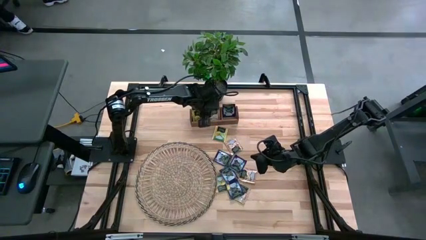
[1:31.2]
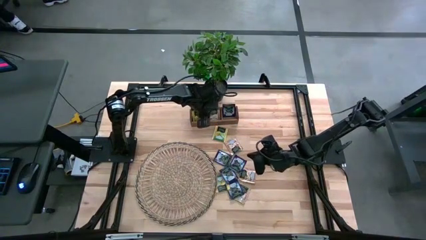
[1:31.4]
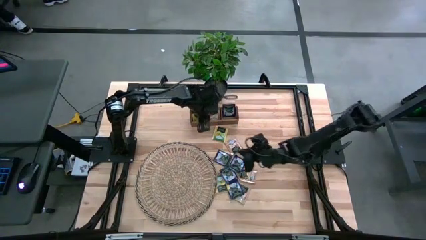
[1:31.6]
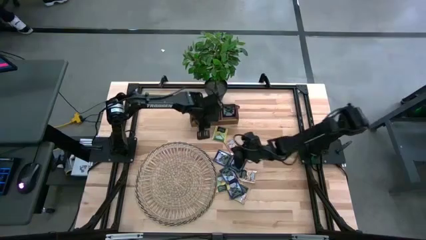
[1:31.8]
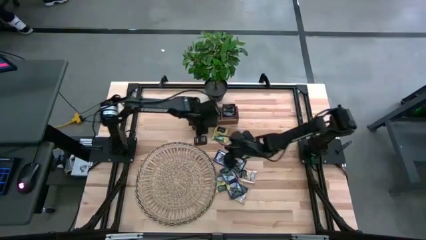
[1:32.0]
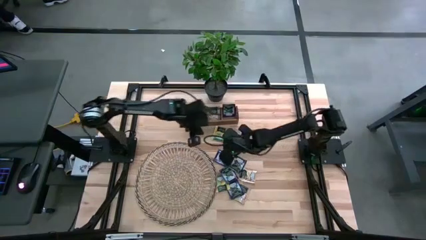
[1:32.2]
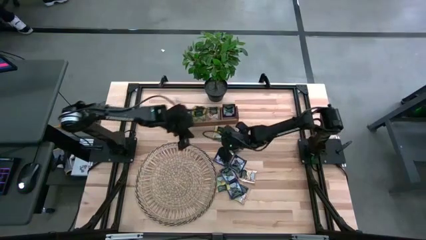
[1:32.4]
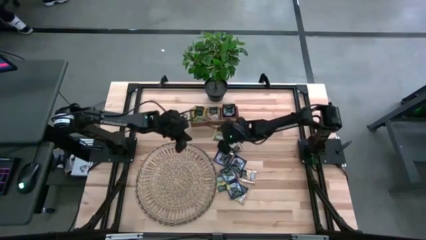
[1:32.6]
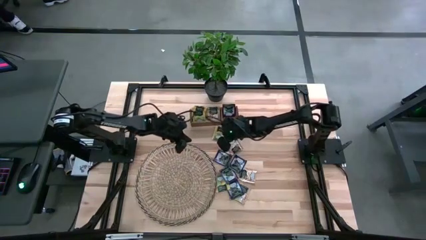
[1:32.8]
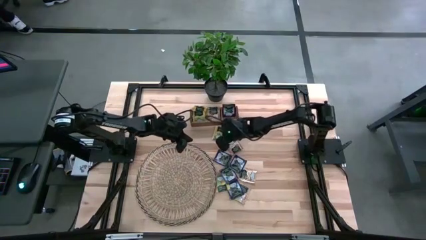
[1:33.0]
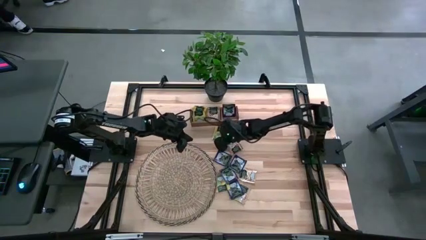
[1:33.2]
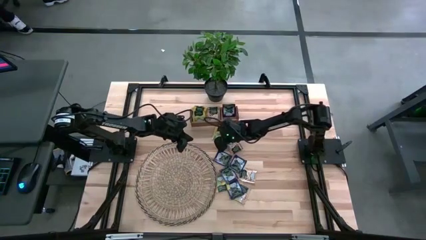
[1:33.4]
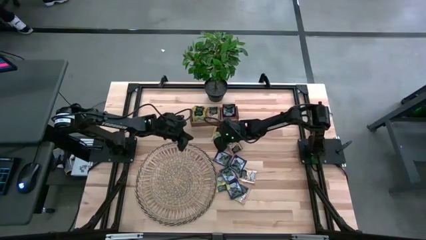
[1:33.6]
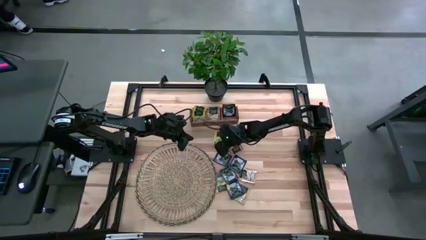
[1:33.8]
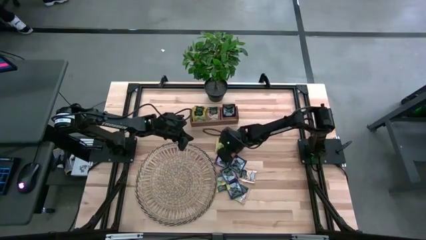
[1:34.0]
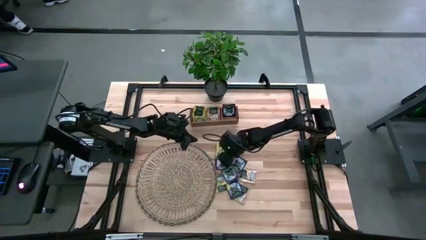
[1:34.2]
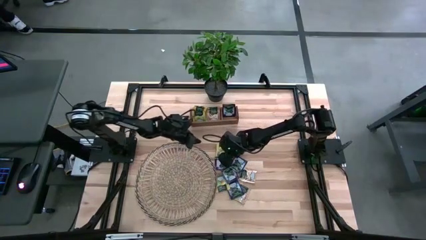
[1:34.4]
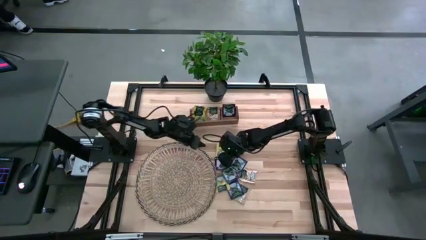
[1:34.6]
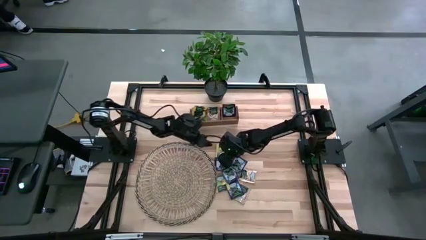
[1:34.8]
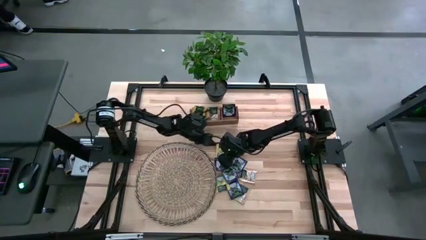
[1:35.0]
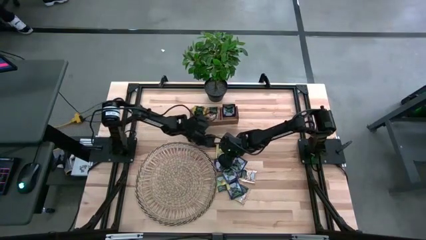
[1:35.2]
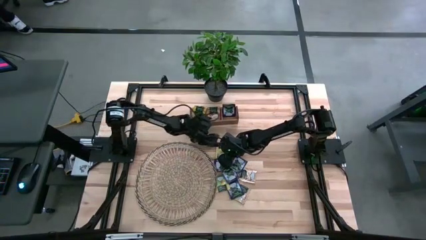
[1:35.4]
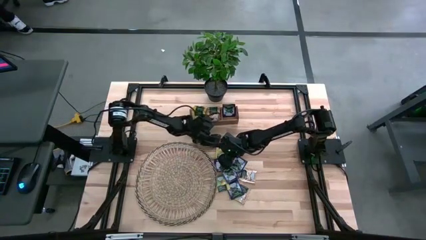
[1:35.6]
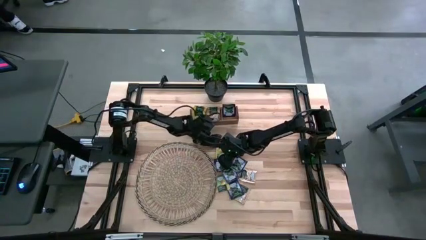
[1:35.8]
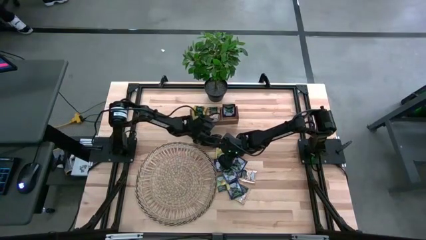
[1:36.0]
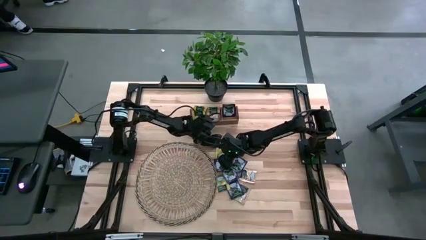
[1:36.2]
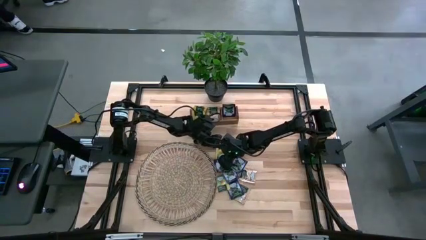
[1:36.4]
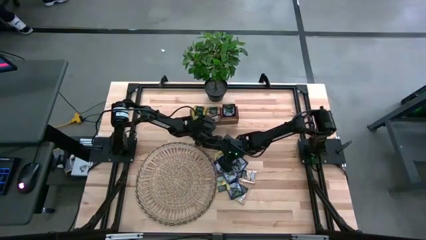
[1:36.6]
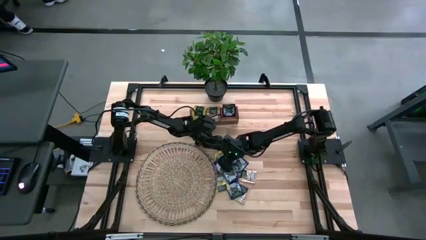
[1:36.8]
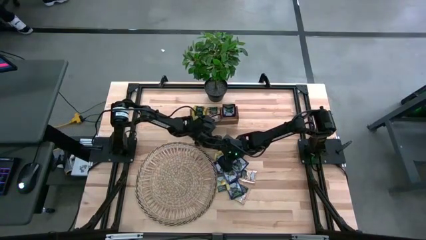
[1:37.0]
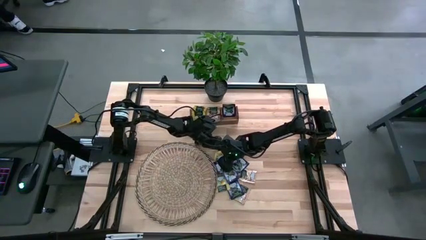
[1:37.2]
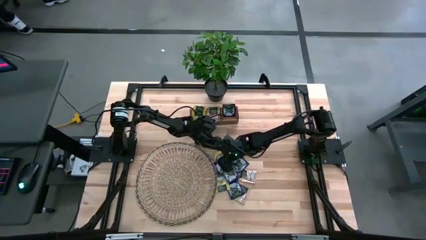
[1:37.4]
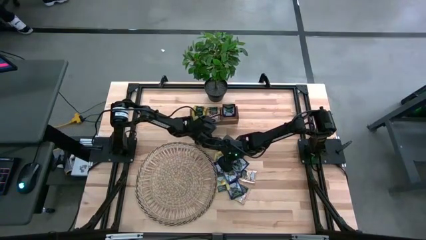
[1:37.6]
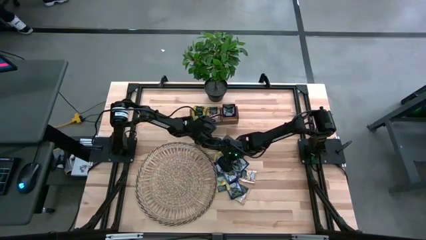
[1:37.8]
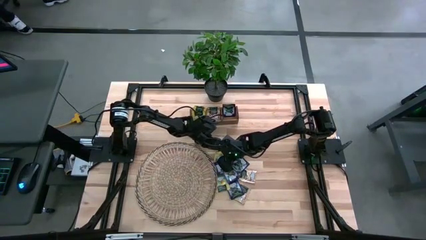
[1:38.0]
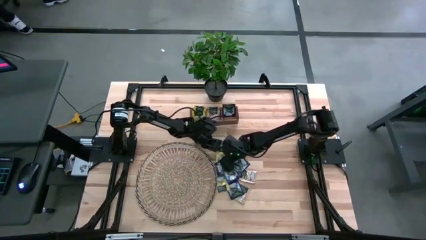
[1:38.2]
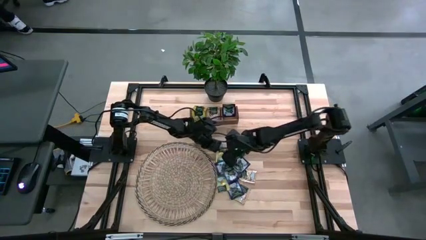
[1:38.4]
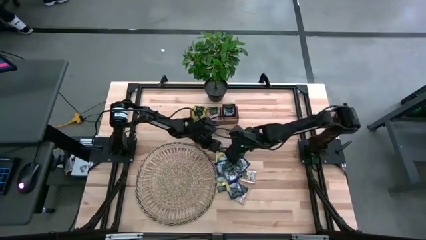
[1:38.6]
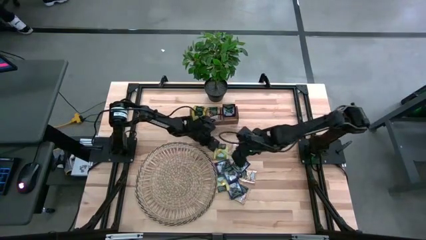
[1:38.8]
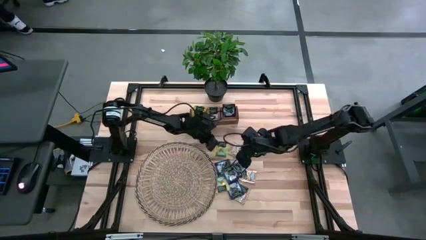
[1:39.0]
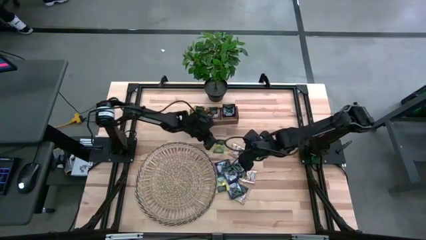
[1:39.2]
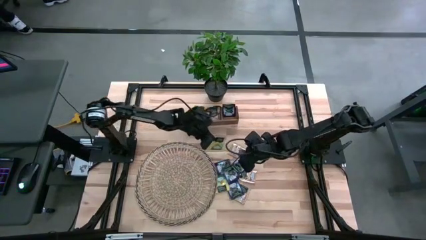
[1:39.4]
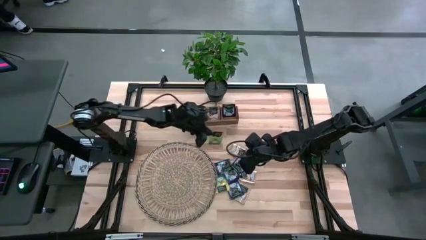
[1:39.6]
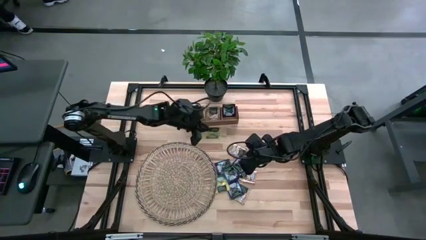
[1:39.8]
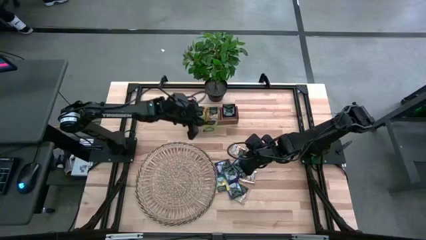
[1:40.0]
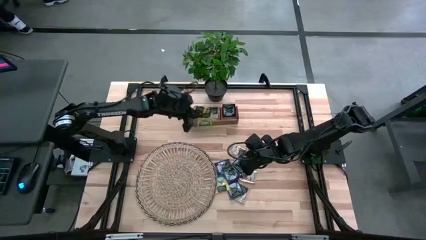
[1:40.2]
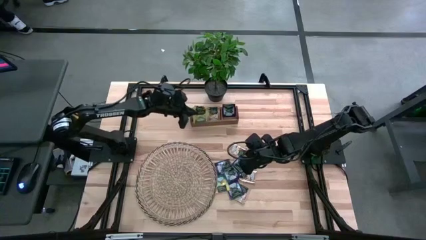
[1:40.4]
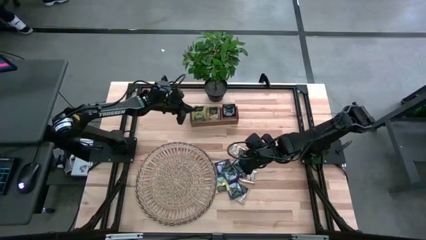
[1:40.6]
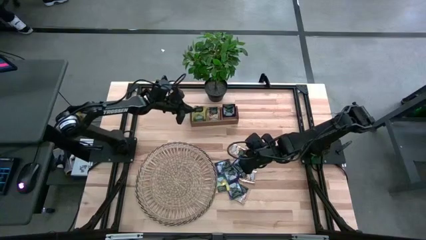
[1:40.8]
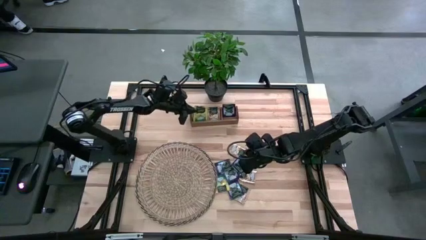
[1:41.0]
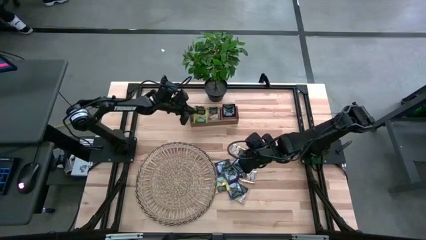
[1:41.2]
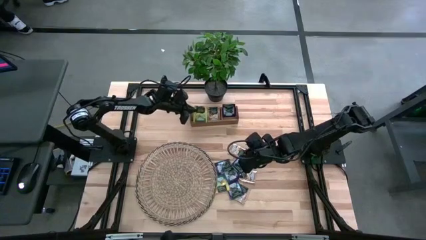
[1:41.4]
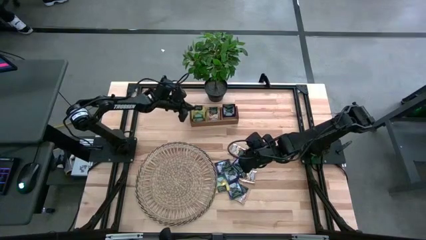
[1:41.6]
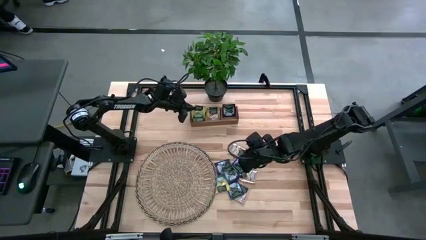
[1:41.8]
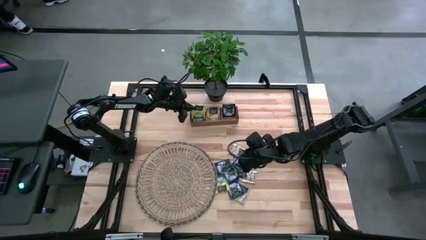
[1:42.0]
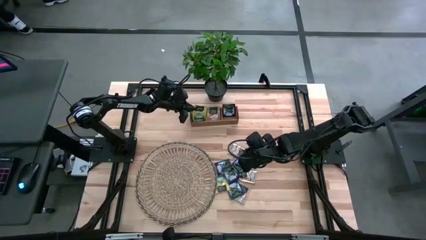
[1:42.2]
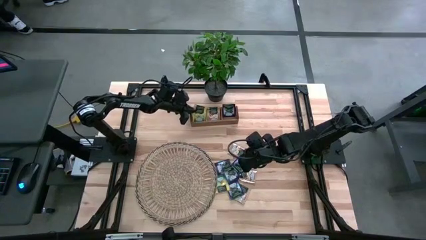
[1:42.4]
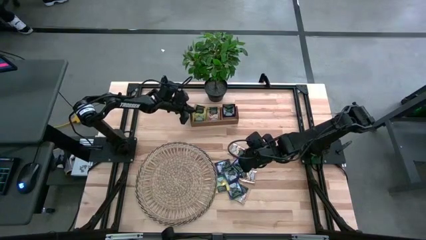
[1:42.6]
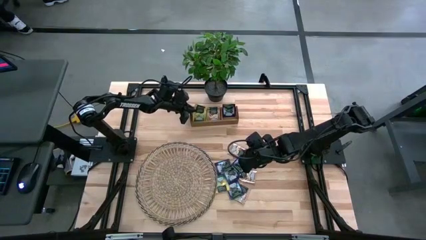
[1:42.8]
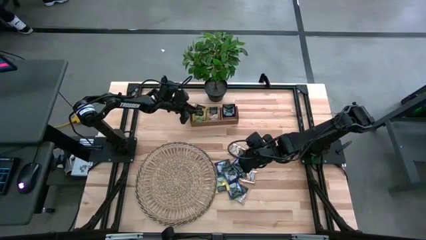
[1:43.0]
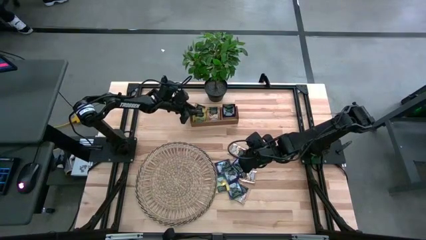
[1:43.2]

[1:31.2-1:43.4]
Task: Pick & Place Tea
Put the yellow tea bag into the left section of the wooden organizer

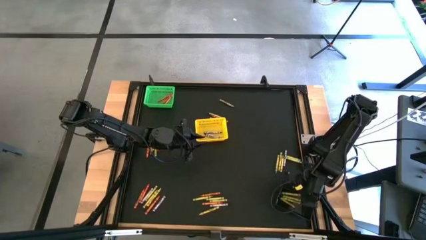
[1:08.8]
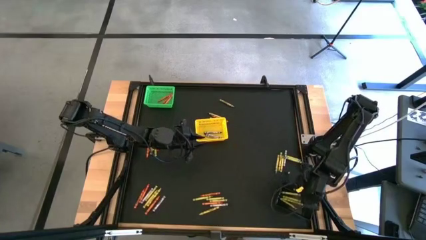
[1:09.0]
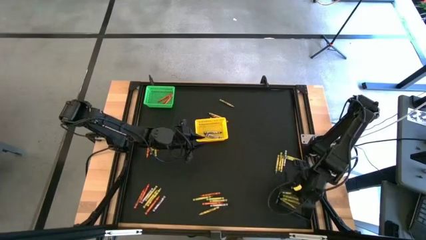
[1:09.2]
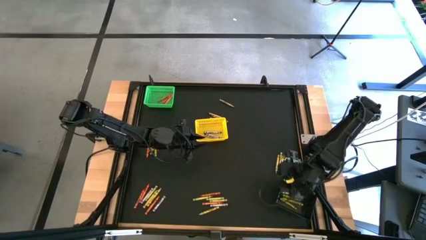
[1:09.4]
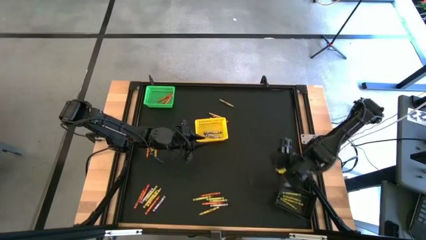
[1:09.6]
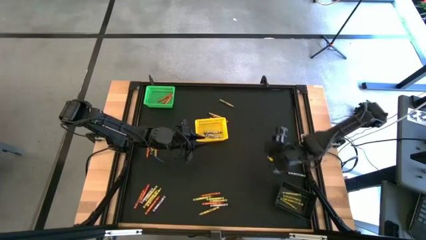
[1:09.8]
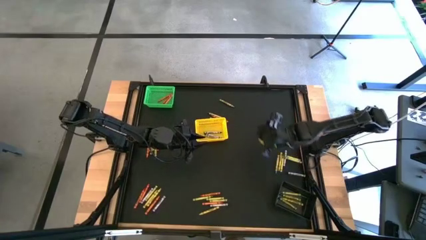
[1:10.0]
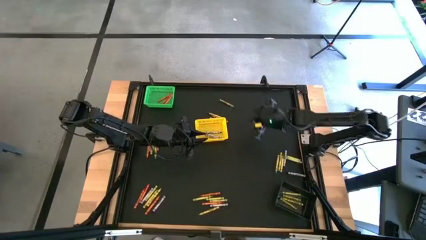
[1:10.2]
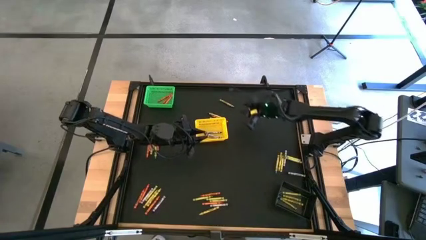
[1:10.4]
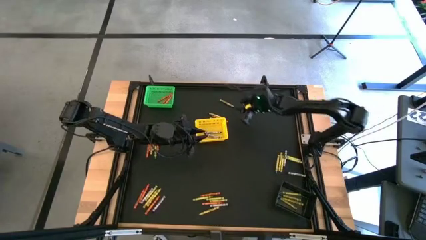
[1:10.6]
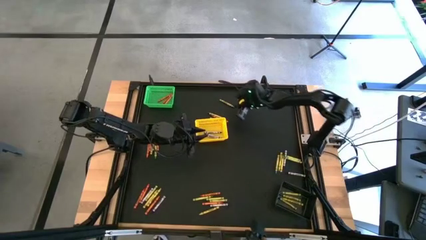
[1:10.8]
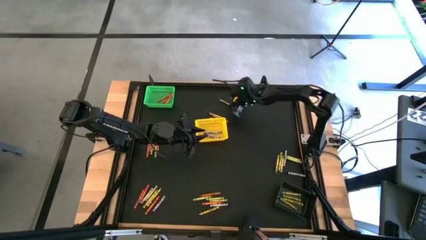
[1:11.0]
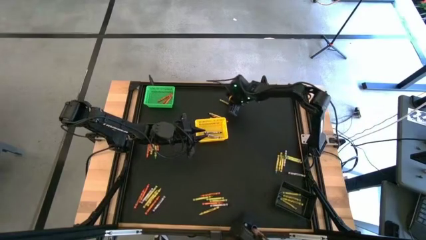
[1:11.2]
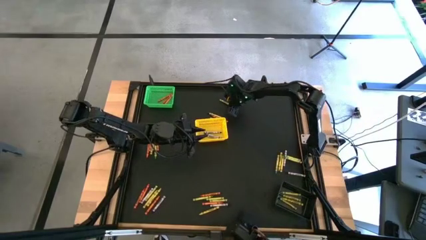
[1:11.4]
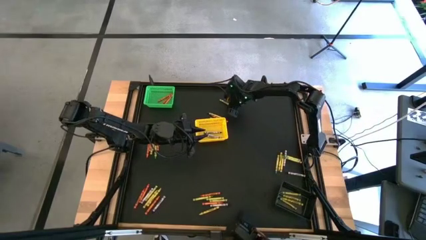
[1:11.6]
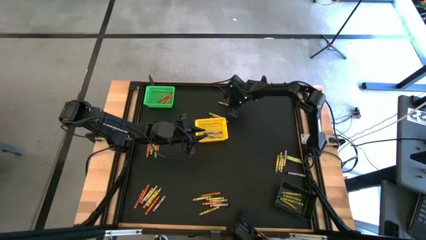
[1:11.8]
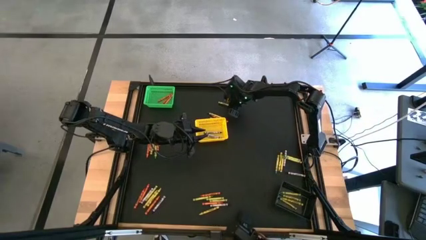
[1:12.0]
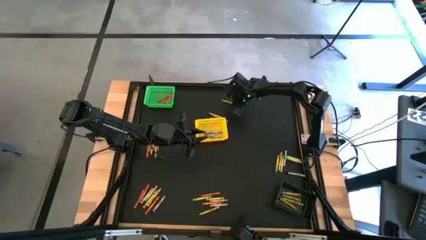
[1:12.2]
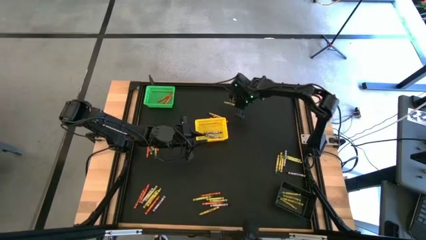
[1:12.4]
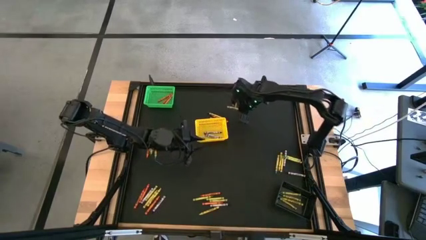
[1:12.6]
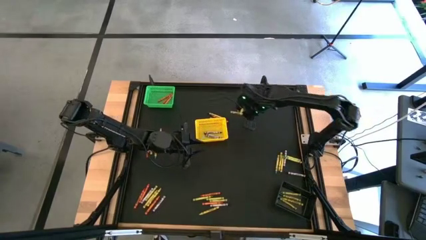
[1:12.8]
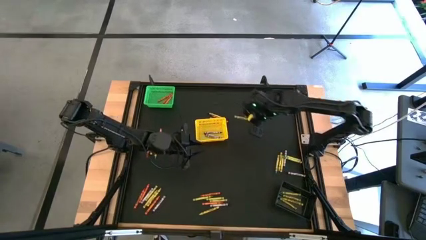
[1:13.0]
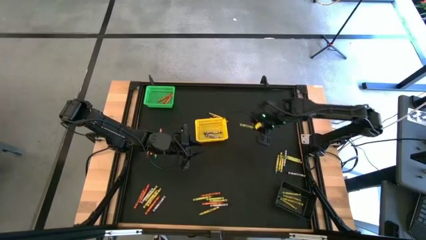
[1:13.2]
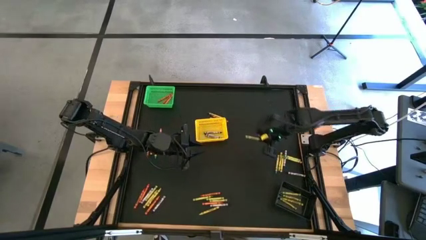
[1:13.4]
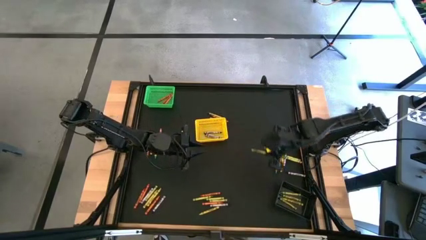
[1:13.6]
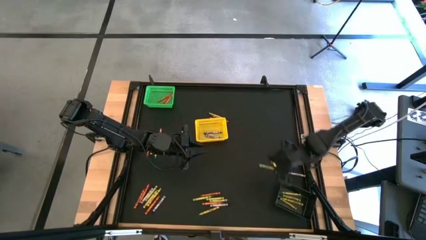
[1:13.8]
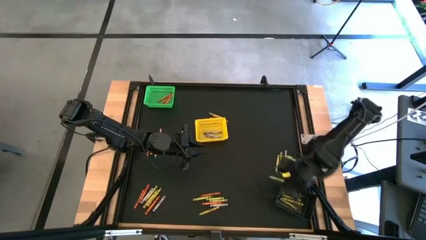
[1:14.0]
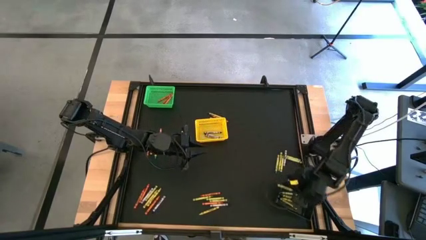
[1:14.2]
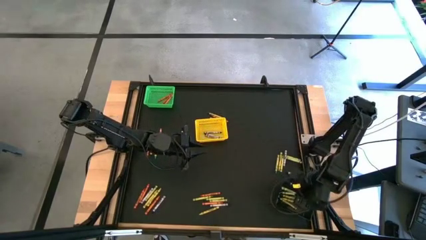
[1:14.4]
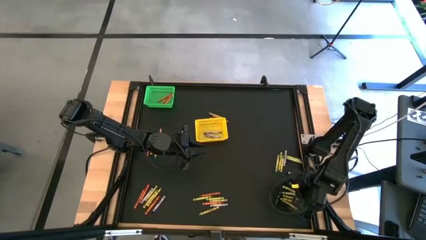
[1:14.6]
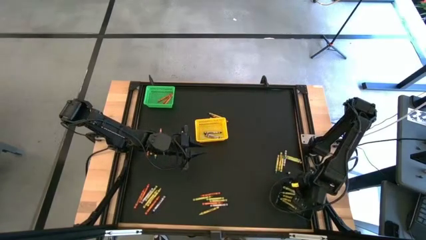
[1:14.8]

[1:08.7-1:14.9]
Task: Sort crayons
Put the green crayon into the black bin
